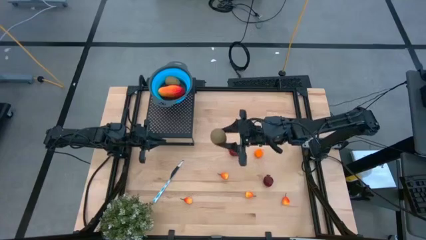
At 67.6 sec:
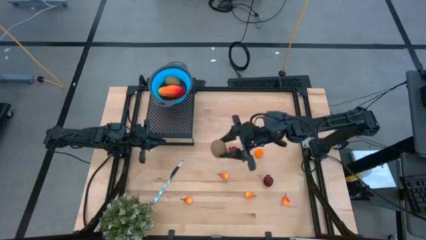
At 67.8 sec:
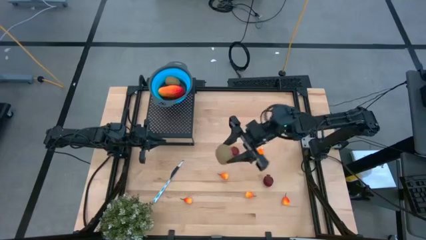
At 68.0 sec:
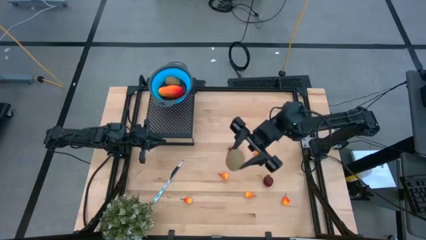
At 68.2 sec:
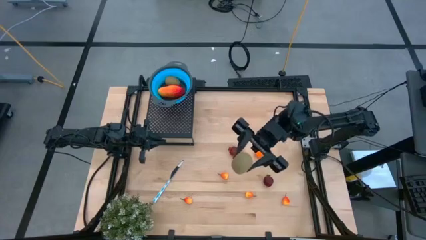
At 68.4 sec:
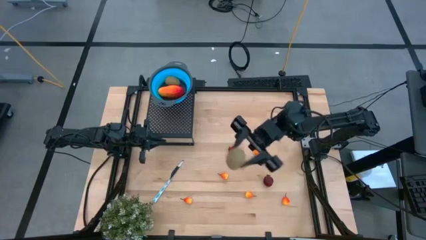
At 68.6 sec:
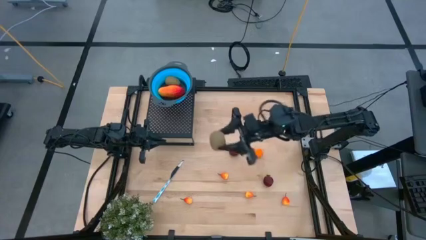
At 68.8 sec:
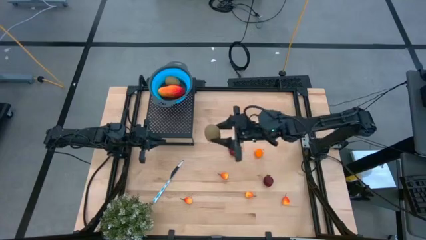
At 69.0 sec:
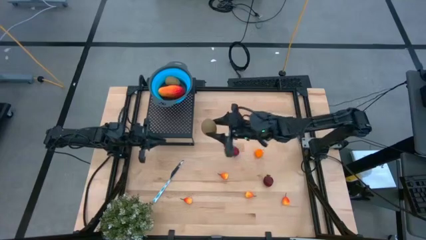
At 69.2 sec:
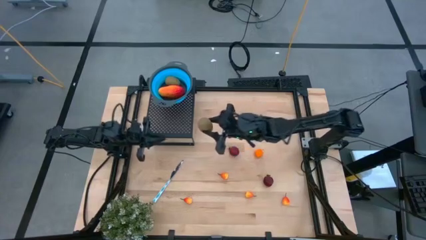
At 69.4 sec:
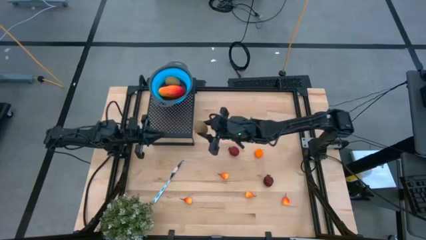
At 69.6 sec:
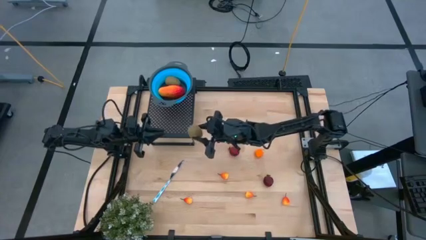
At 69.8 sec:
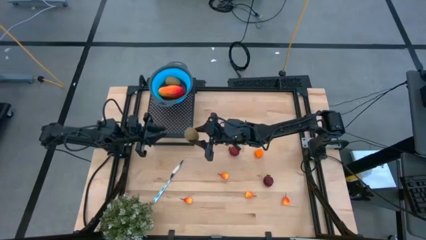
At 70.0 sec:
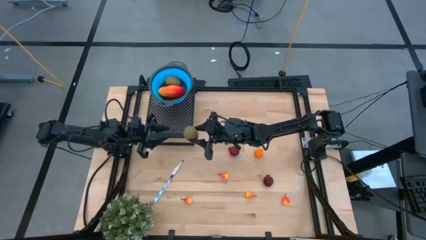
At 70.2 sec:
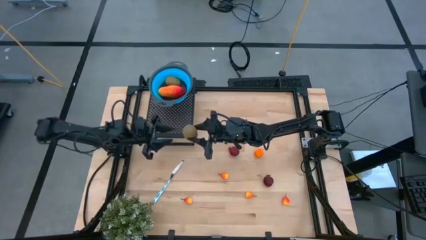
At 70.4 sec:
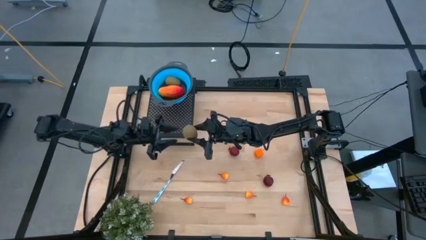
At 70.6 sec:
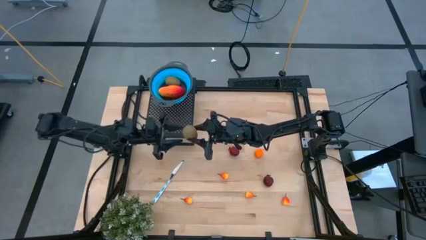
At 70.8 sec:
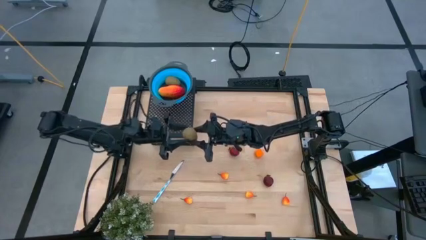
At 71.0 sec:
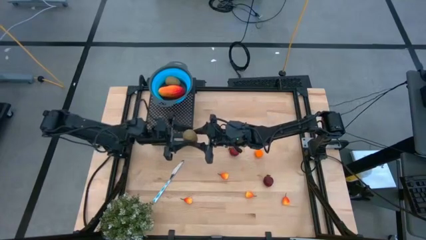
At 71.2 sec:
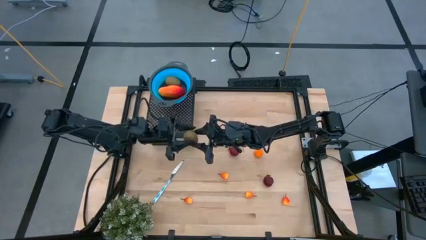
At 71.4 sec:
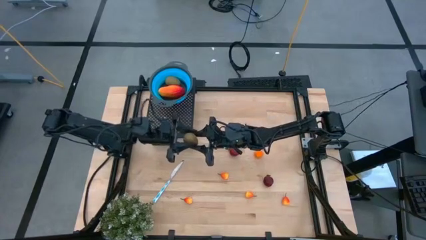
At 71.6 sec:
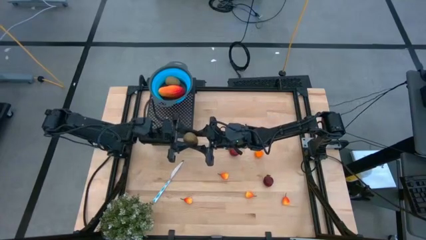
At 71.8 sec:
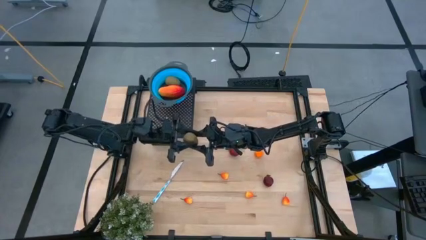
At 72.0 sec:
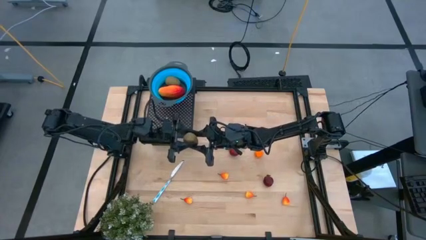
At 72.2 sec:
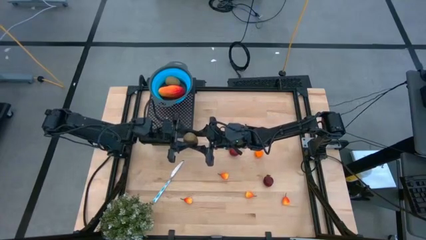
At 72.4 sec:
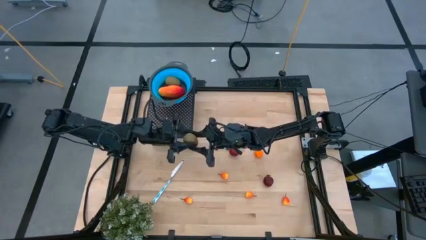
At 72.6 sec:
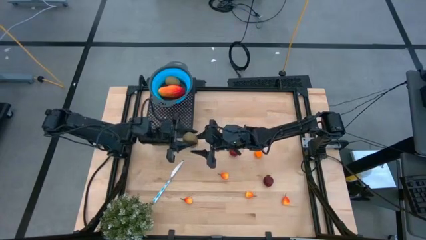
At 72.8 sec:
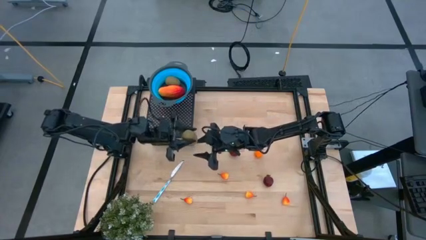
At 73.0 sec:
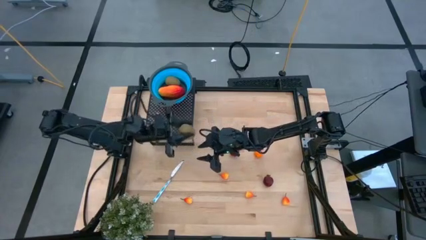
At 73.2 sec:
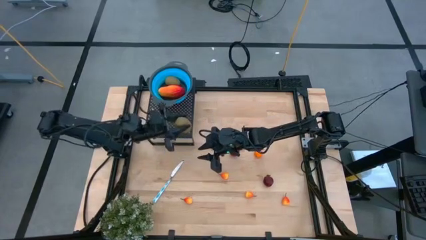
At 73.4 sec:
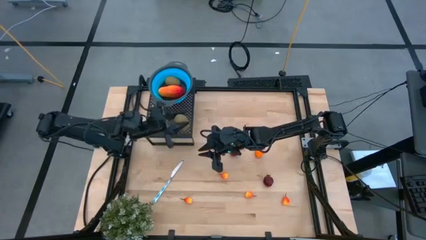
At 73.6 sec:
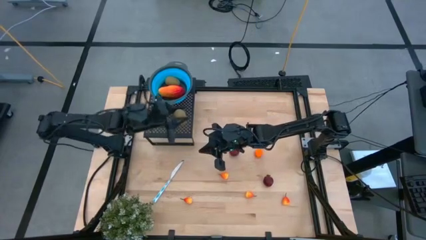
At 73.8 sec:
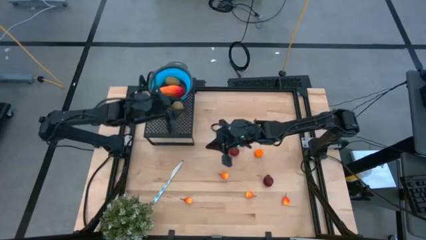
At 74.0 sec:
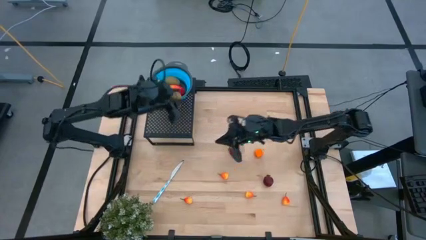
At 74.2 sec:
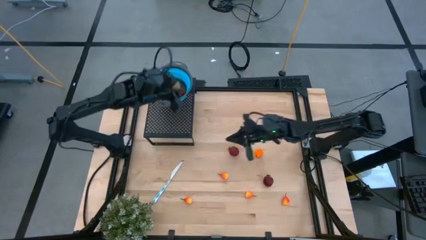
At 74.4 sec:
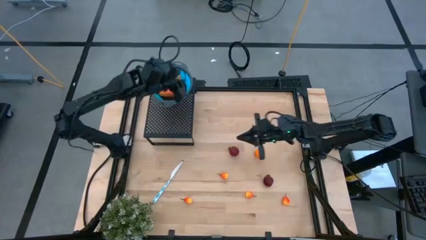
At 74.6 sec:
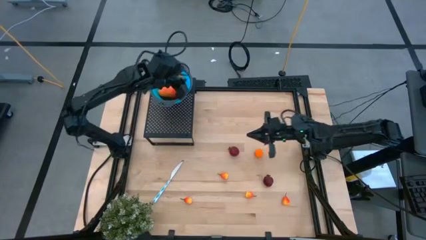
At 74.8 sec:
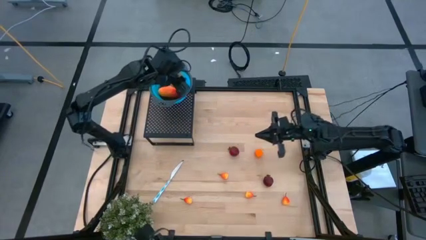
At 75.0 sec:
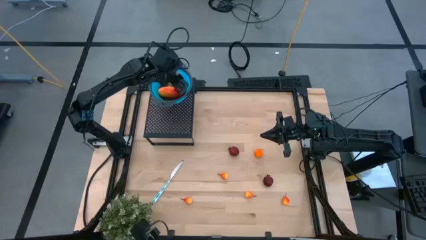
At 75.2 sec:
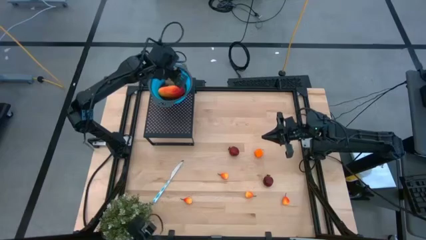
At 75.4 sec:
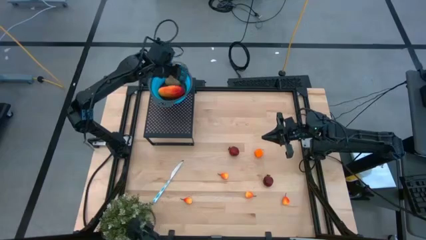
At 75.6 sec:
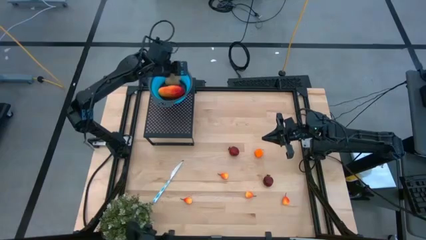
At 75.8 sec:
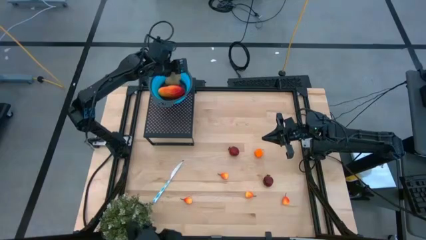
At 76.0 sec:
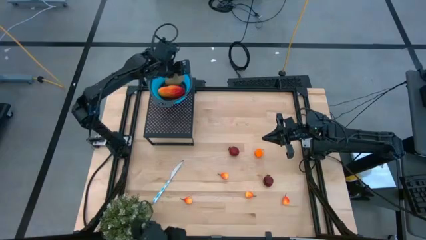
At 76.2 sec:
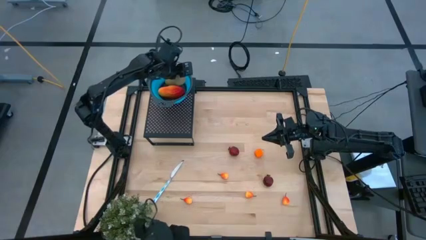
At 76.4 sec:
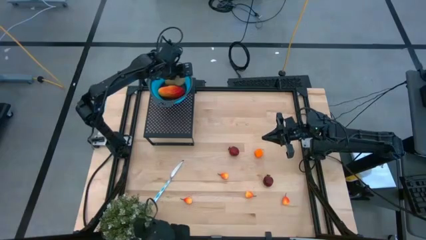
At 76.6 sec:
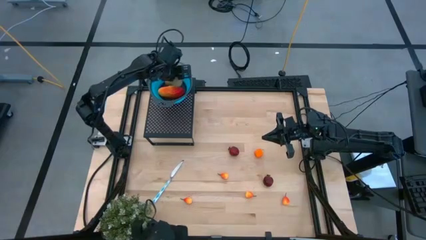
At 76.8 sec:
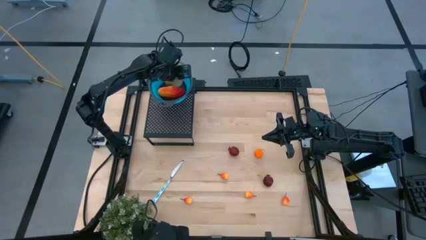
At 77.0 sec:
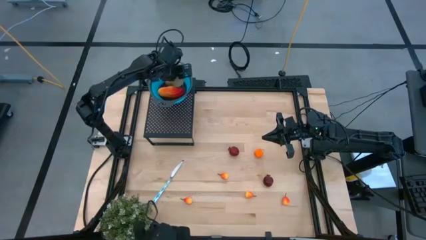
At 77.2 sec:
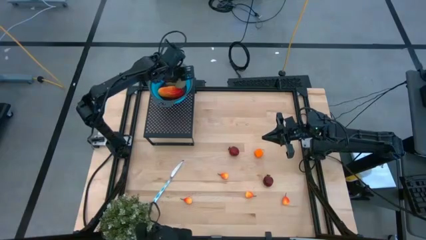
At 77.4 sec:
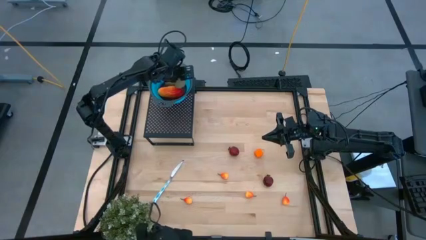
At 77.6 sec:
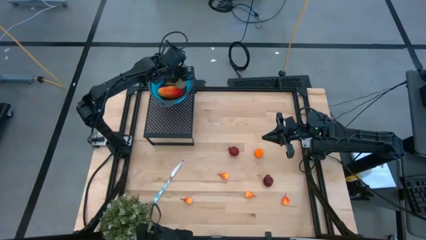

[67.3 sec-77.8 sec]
Task: Pick & Place Fruit
Put the brown kiwi into the blue strainer bowl on the shelf

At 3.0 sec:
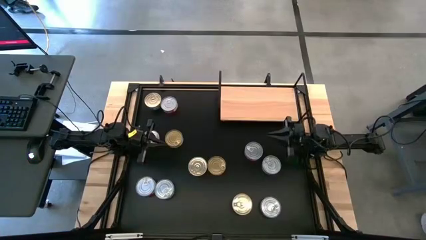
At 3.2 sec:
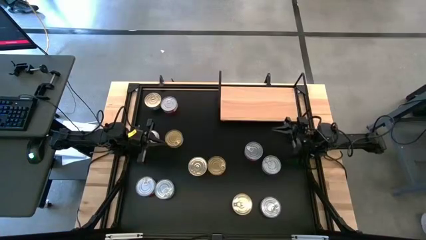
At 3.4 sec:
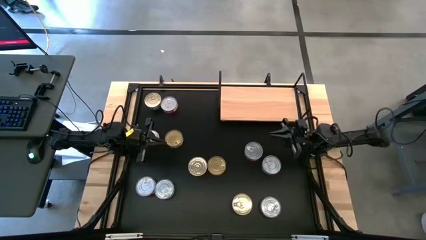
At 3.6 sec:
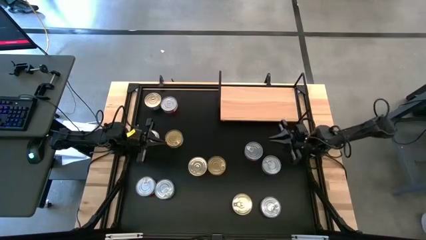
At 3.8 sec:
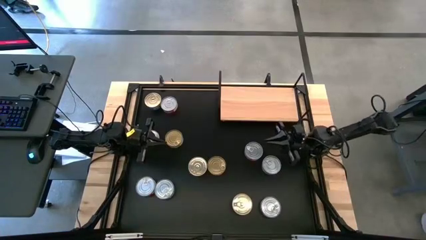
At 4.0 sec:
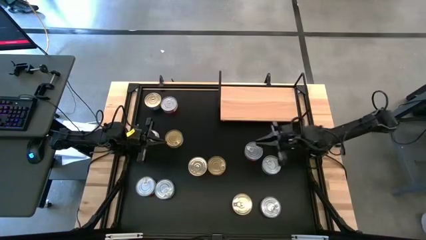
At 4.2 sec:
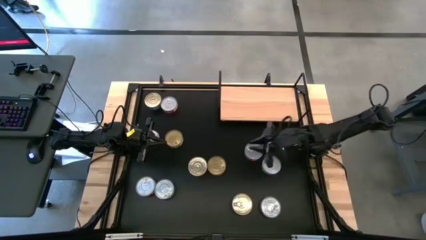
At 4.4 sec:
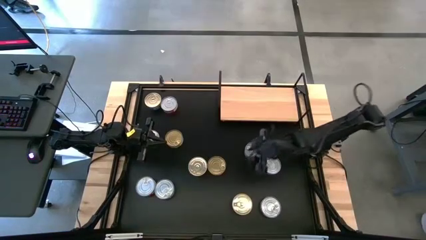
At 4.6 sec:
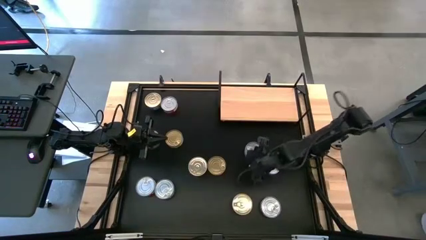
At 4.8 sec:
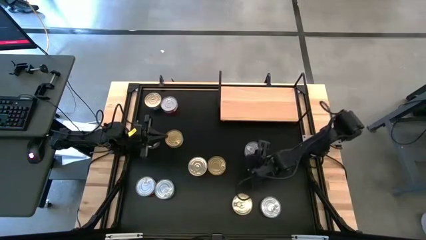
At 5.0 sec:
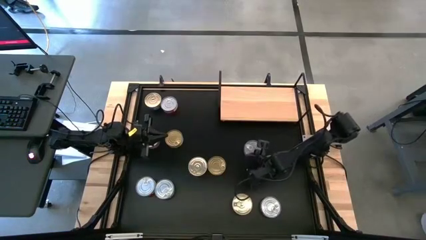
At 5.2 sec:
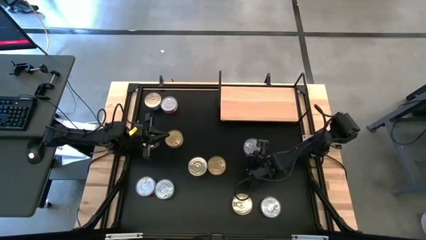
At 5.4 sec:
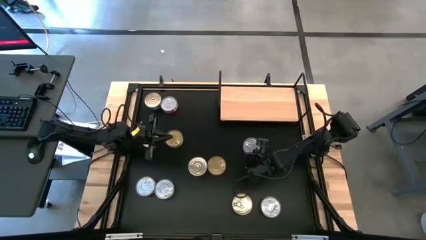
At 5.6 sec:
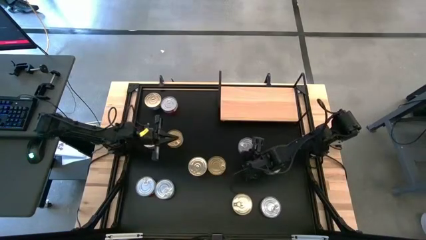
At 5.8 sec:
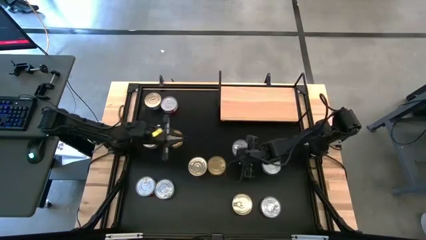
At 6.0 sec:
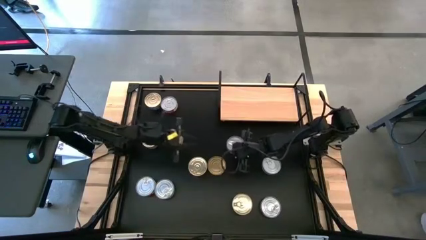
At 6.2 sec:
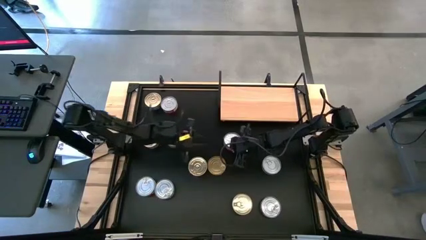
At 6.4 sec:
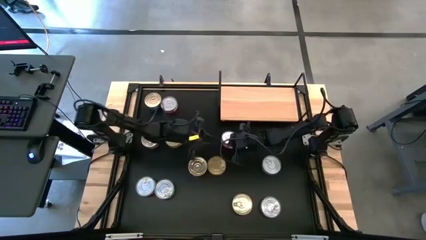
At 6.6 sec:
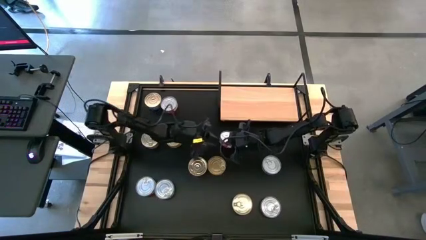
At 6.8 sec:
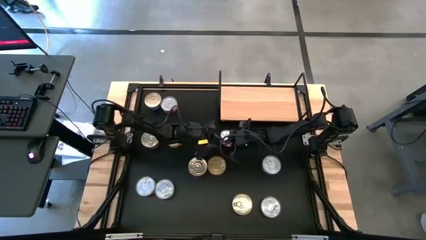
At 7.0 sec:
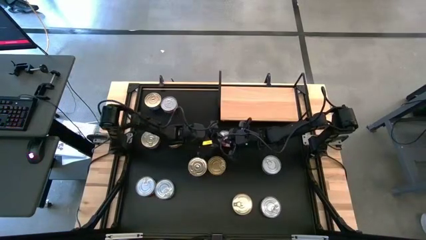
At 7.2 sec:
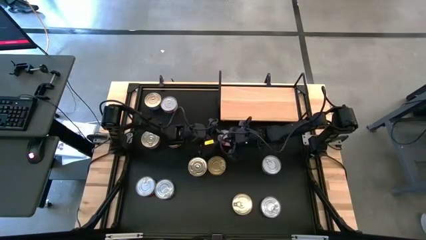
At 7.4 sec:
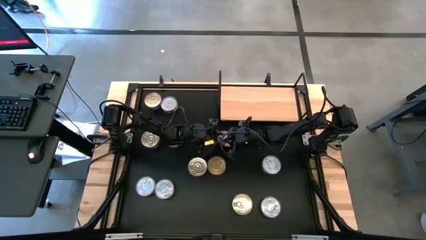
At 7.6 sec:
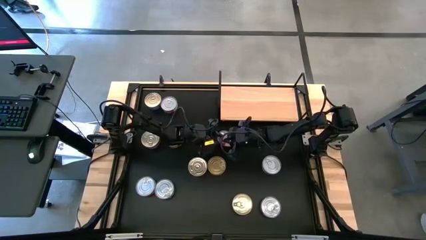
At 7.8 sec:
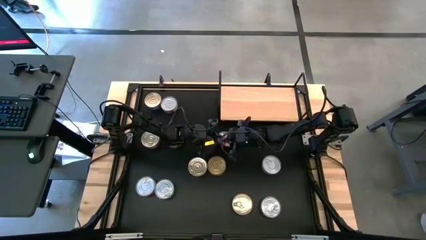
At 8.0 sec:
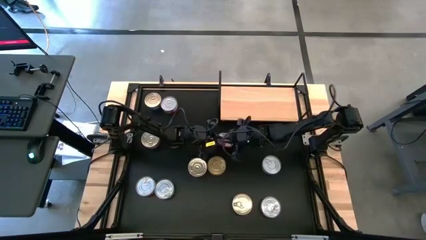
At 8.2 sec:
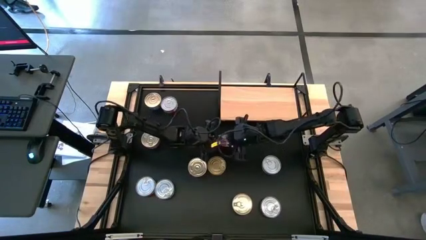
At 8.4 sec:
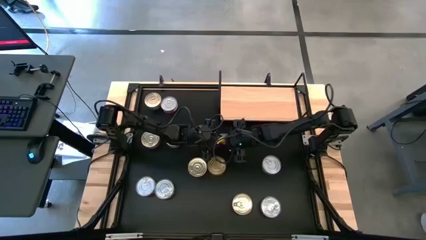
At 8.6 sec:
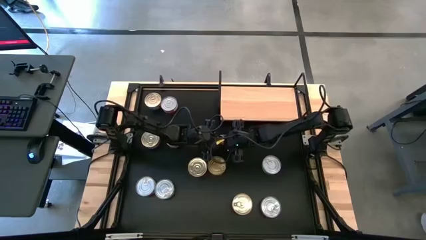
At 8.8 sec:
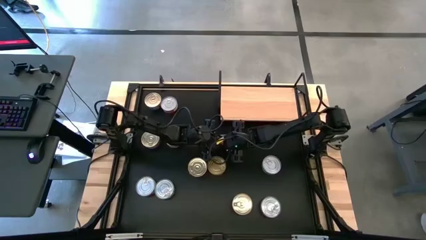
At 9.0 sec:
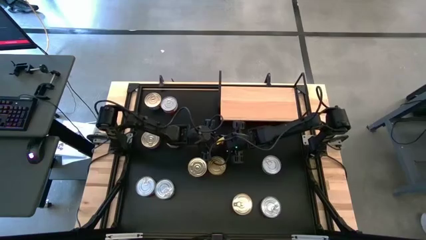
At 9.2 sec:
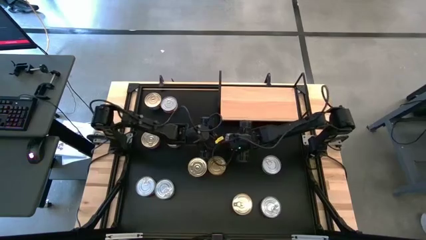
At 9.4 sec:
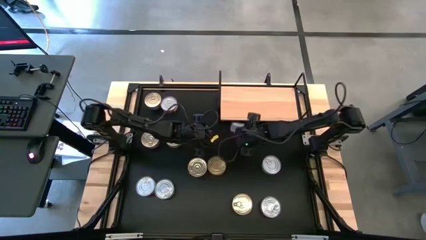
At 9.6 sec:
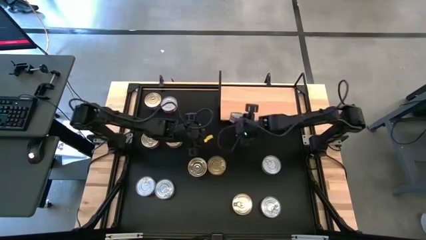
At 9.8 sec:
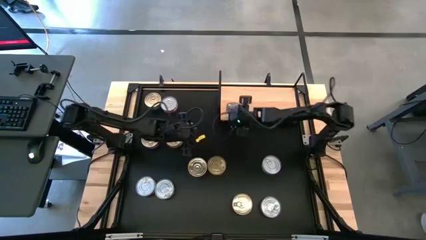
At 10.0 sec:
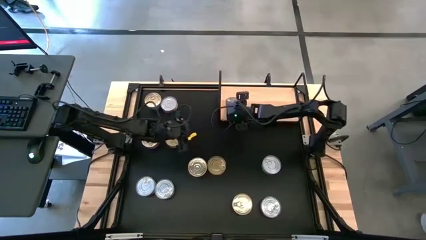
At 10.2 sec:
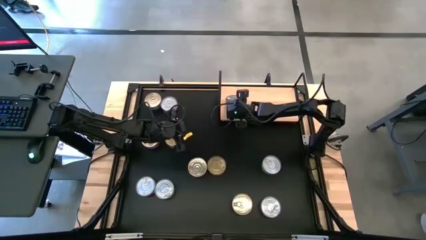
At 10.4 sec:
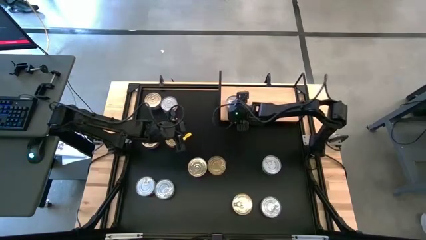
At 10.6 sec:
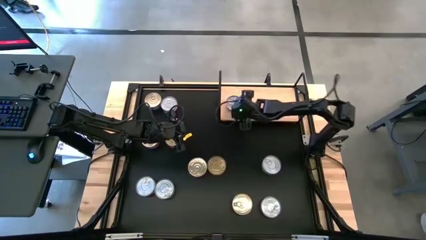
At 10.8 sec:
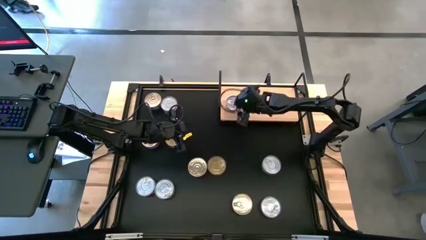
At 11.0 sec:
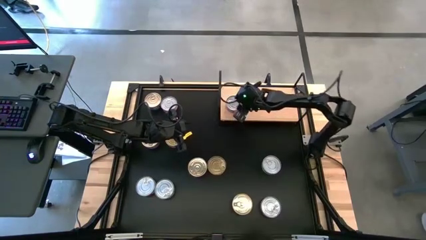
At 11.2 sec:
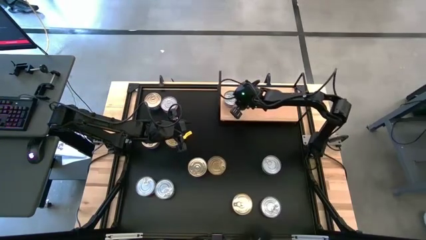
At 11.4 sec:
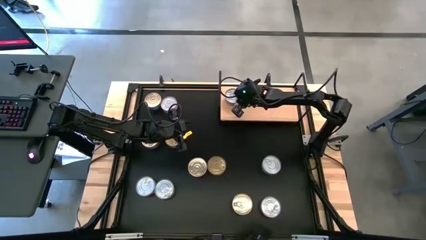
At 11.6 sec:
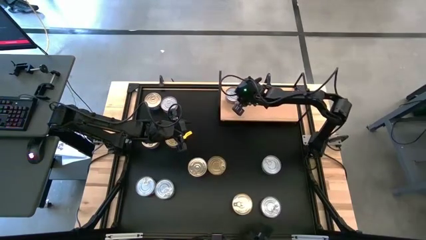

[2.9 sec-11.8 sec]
Task: Stack canned seafood by type on shelf
Put the red tuna can on the shelf
